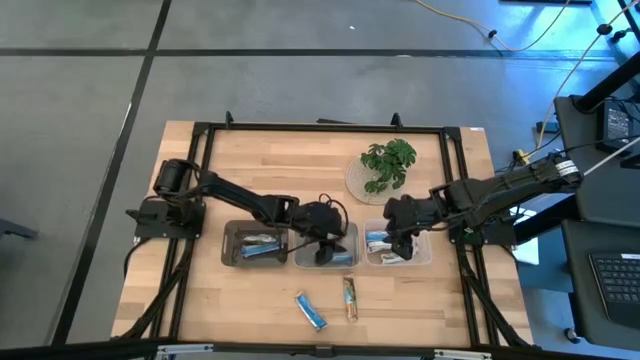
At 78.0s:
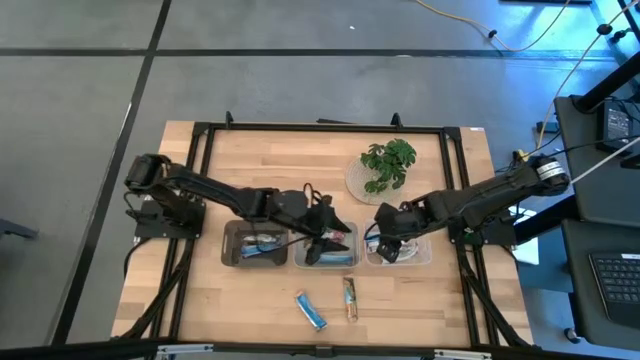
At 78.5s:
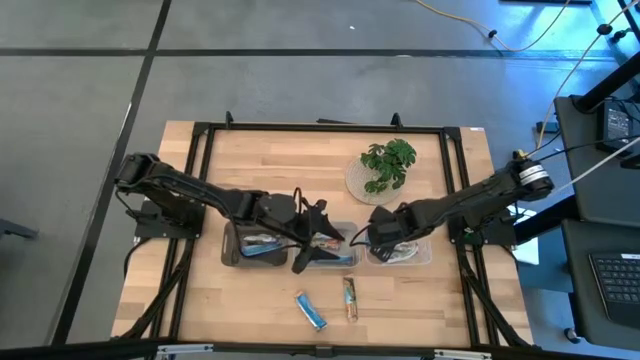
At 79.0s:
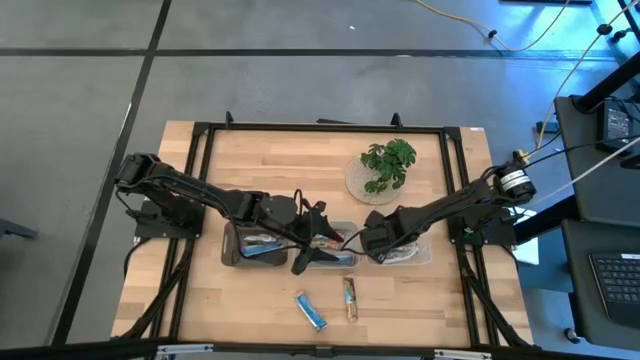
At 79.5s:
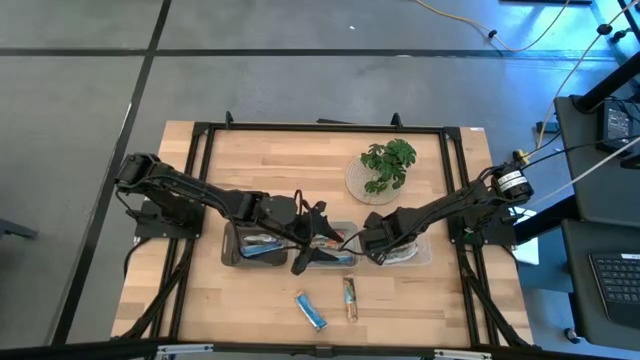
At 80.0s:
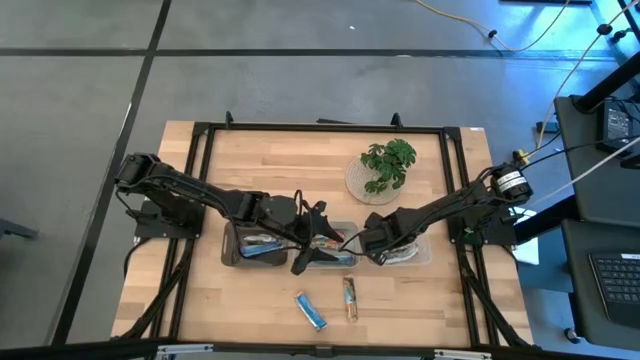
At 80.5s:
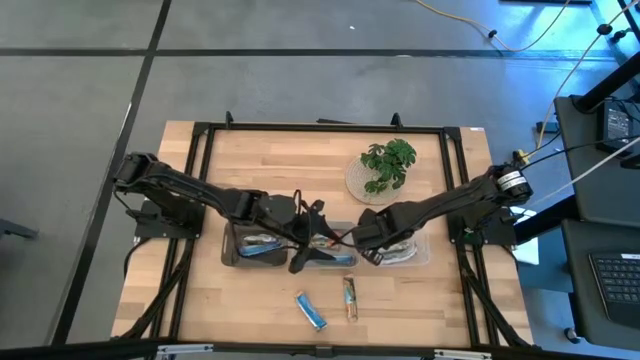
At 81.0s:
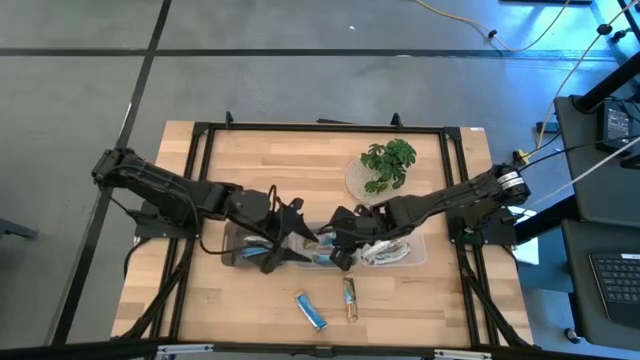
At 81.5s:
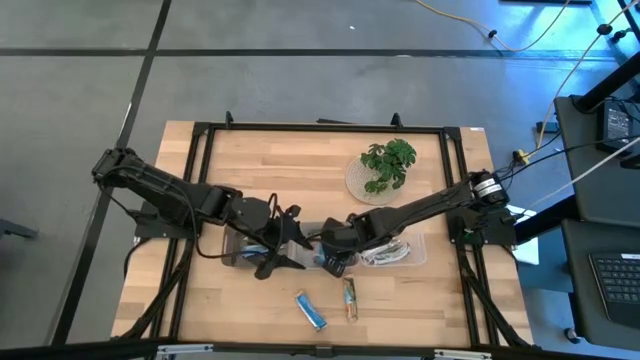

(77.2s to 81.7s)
Task: Pick and place Granola Bars by type
Put the red granola bar into the gray bin

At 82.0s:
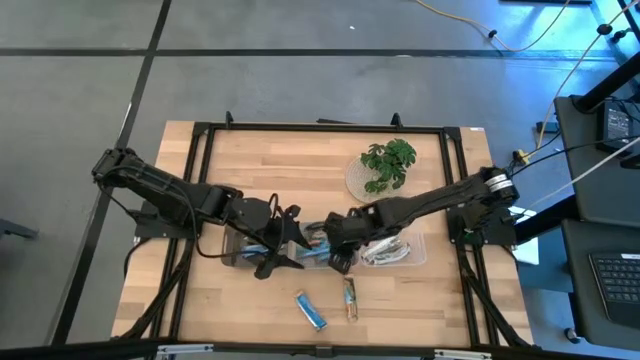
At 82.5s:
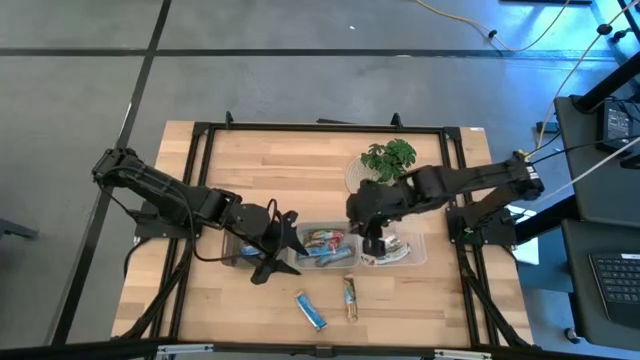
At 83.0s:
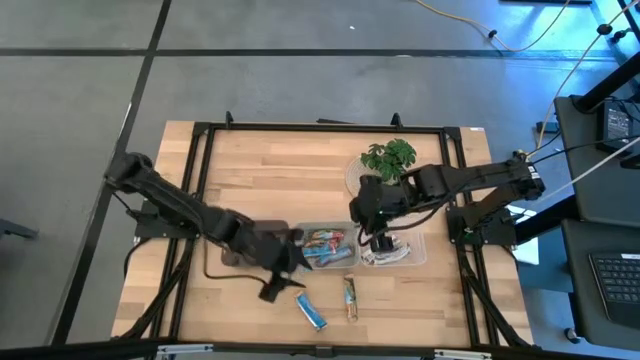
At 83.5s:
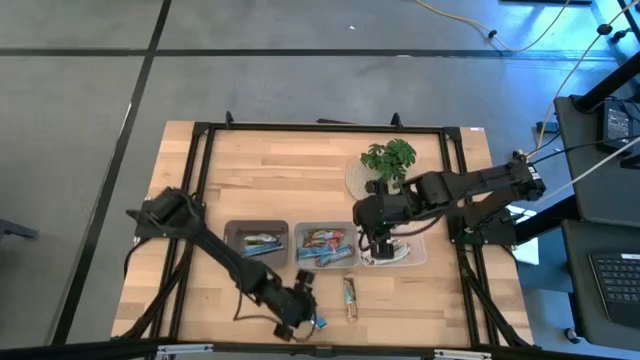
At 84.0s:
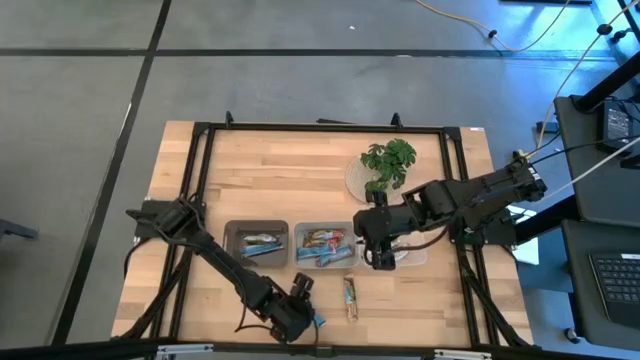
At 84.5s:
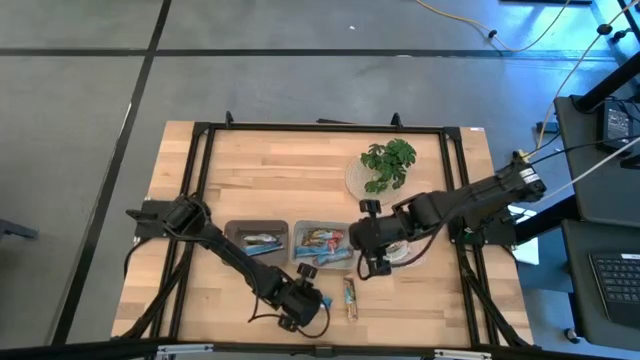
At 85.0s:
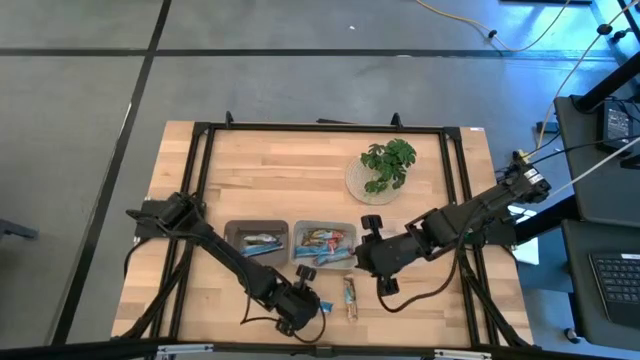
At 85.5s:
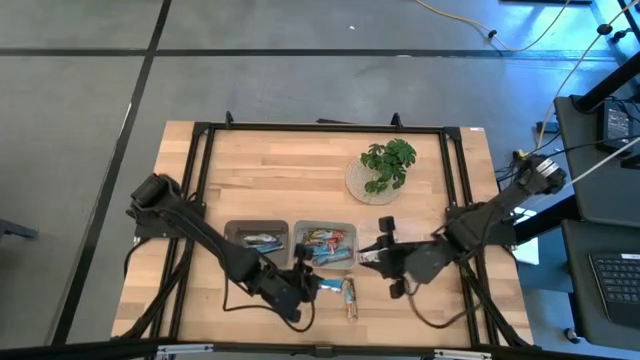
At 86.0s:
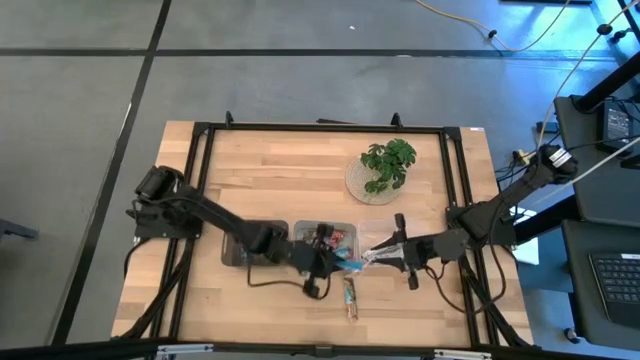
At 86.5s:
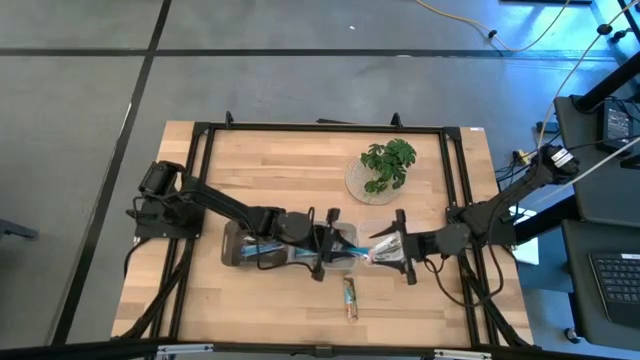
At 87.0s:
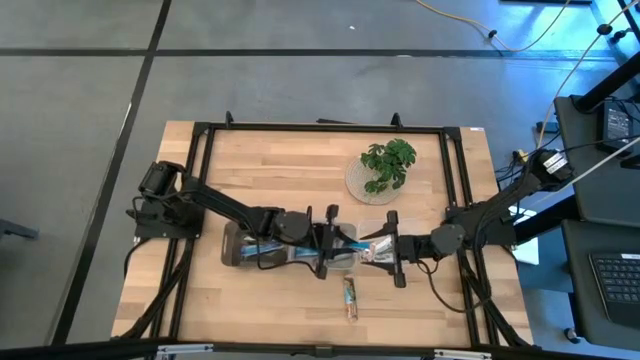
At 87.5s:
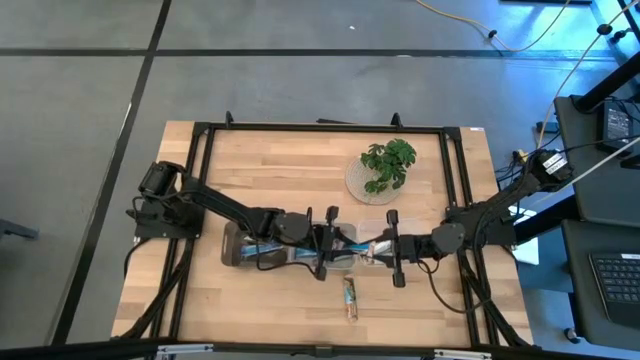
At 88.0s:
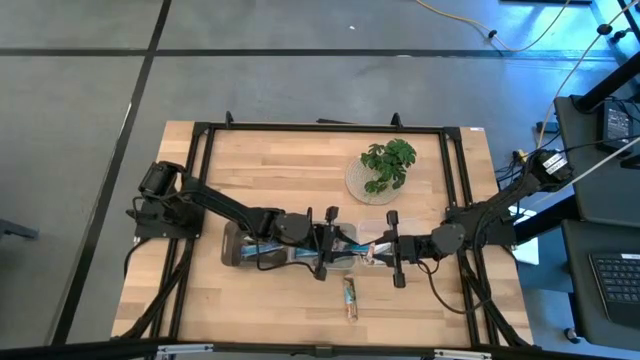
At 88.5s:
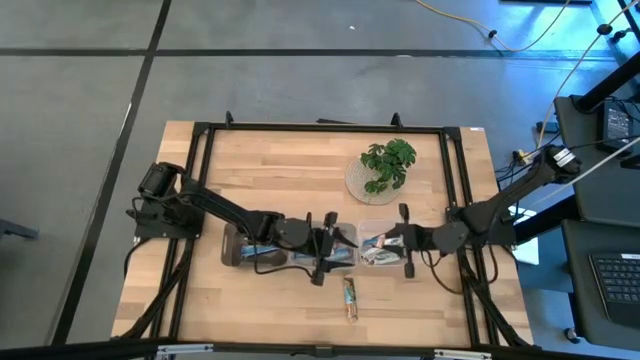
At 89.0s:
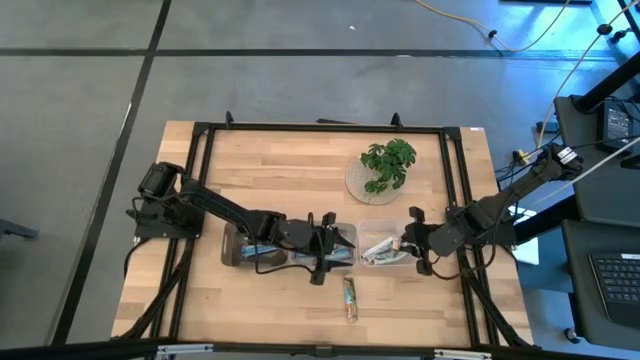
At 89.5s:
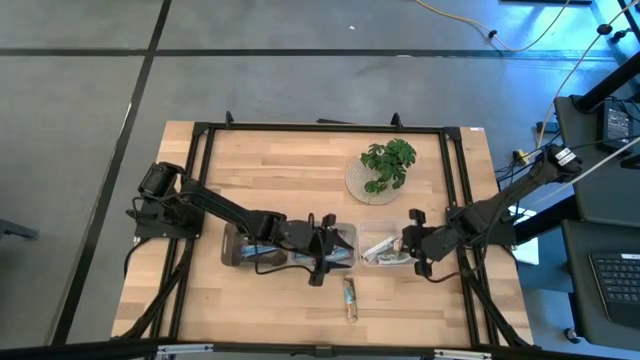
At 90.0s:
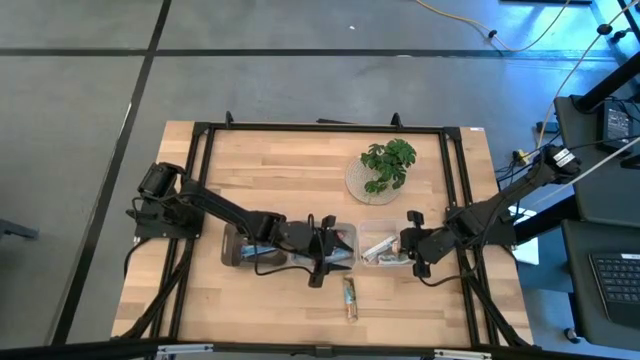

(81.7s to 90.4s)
Put the orange granola bar into the transparent bin

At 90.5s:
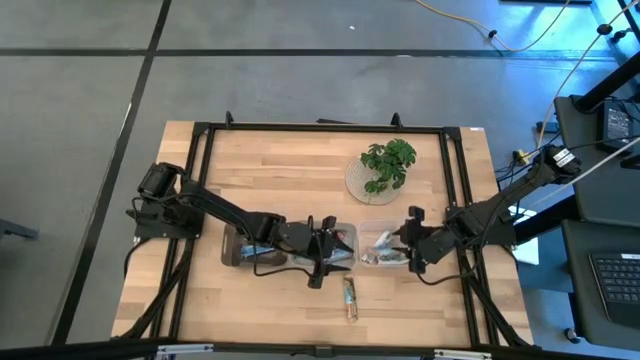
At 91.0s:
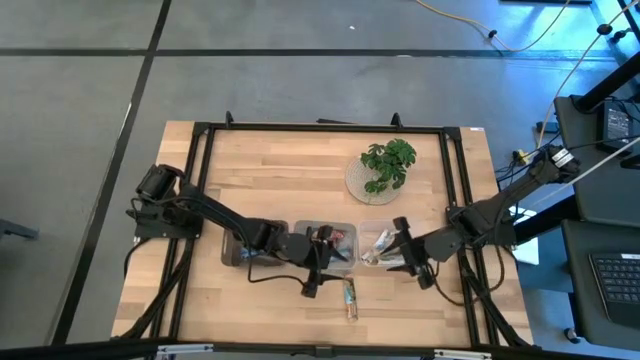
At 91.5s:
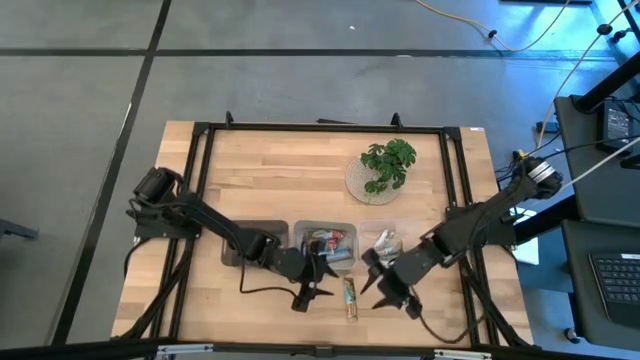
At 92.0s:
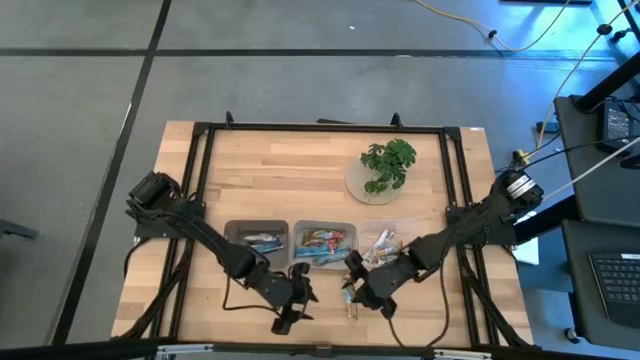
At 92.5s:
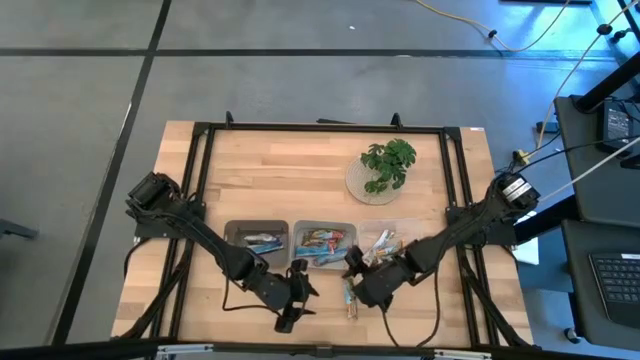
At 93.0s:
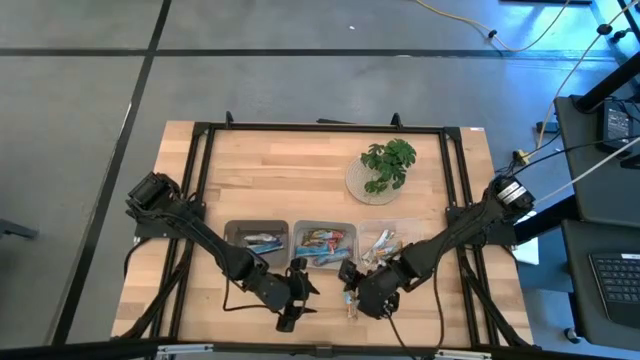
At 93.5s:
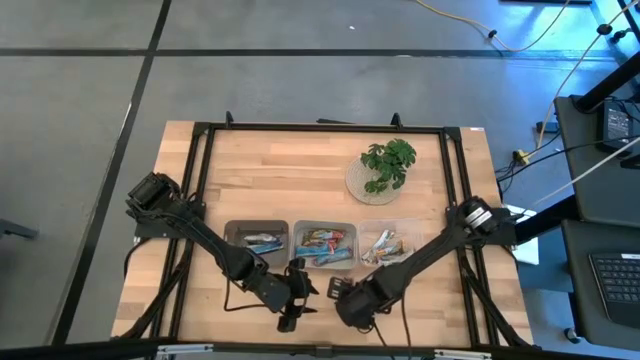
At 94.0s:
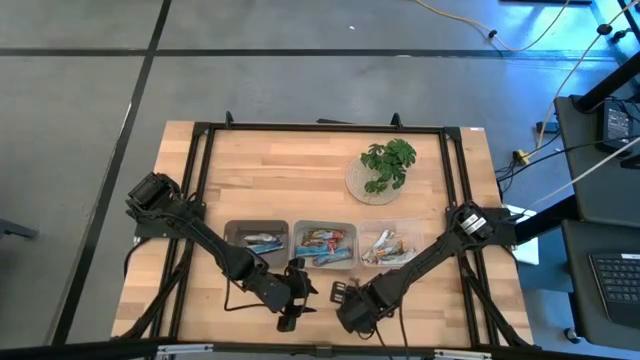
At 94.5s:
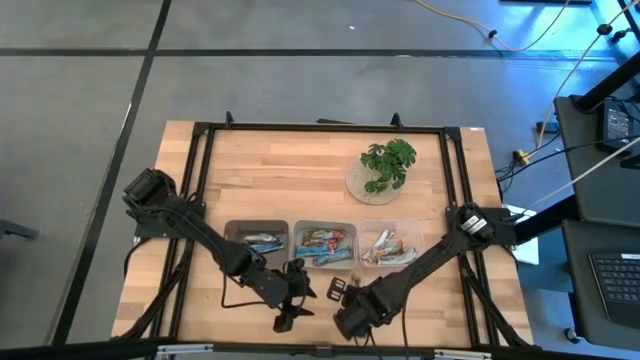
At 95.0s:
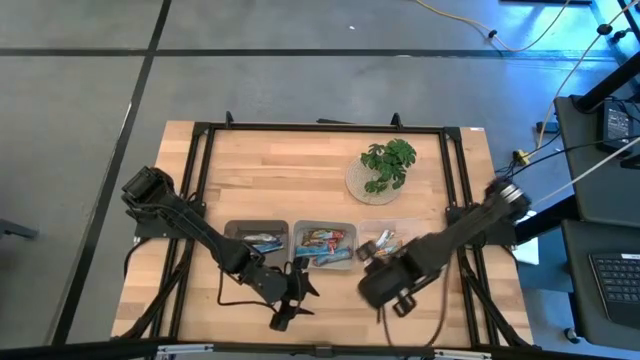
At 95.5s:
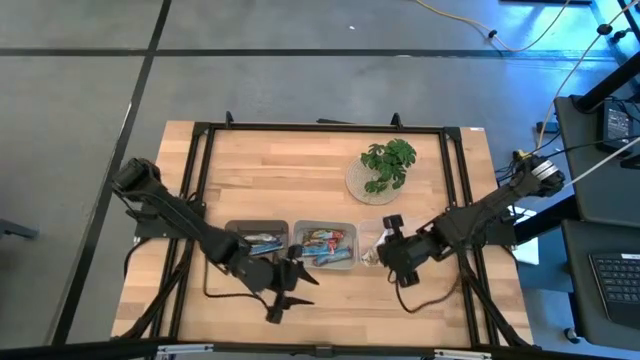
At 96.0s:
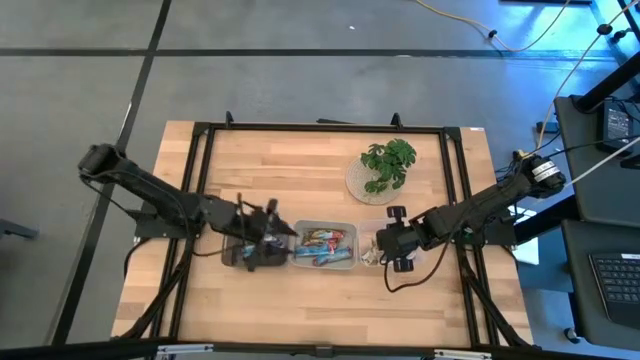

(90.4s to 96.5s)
Put the orange granola bar into the transparent bin
